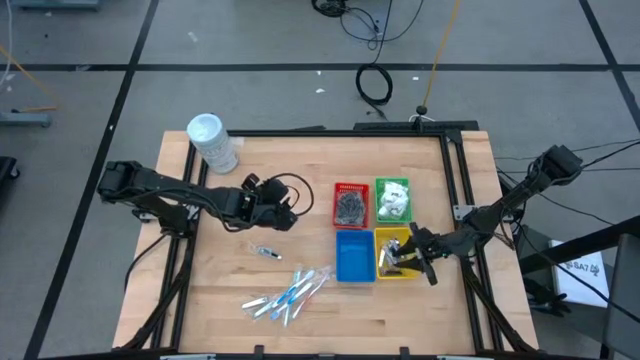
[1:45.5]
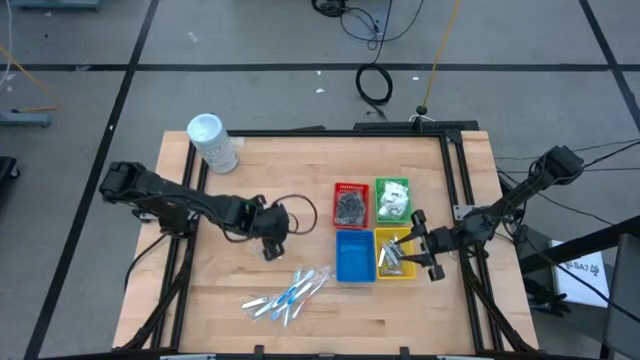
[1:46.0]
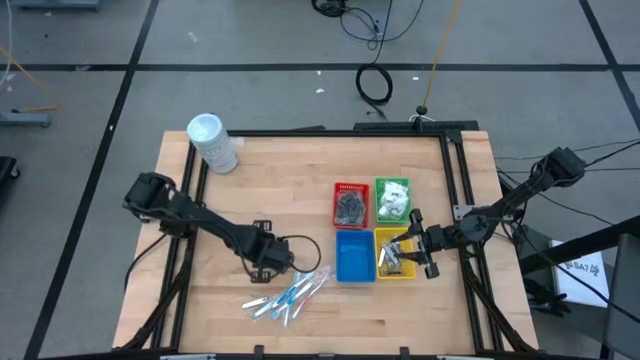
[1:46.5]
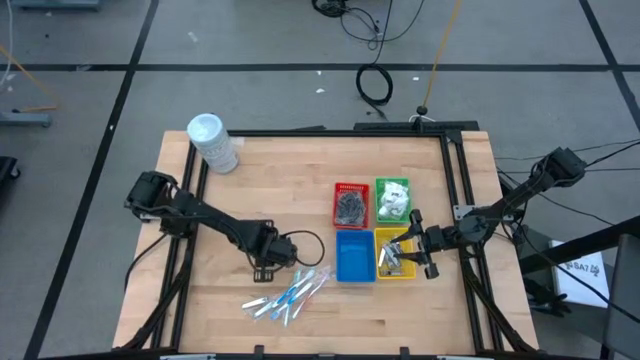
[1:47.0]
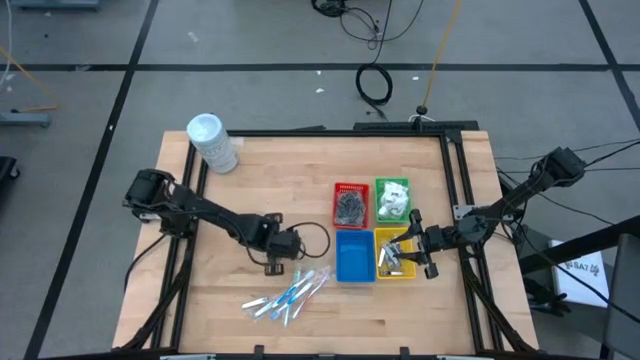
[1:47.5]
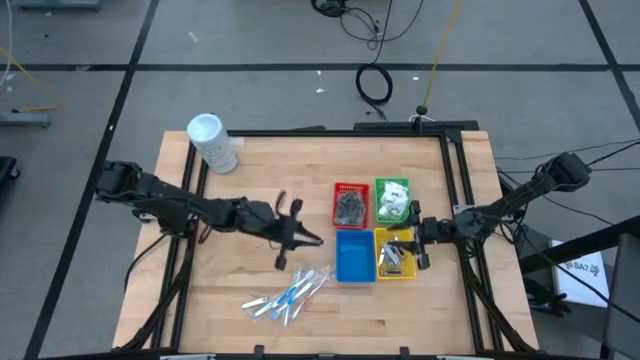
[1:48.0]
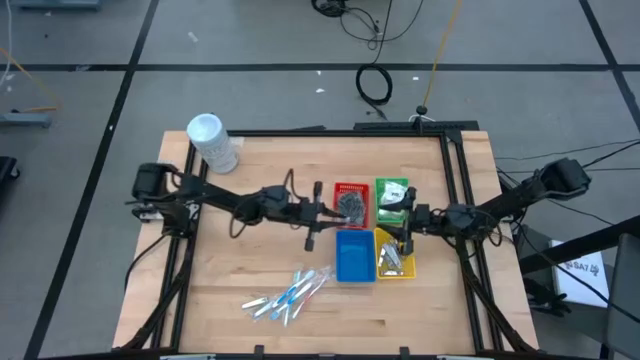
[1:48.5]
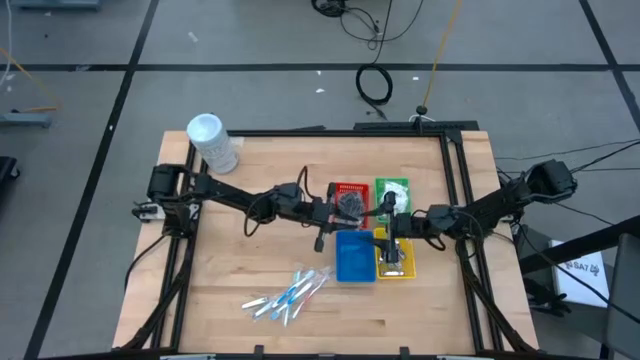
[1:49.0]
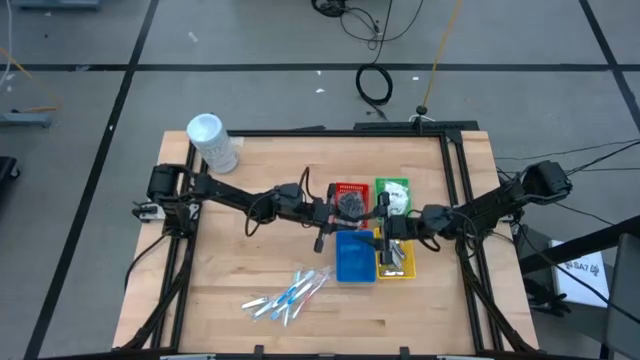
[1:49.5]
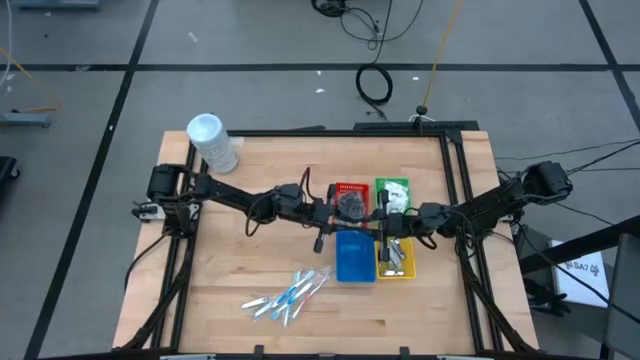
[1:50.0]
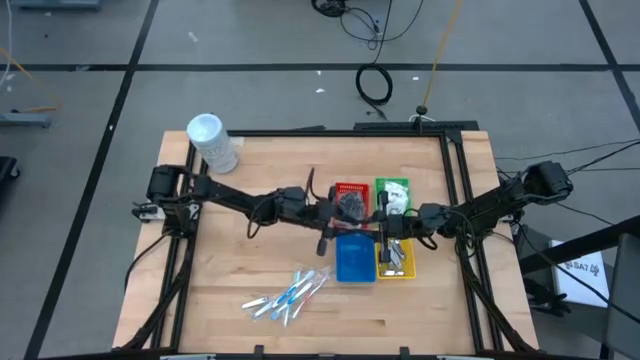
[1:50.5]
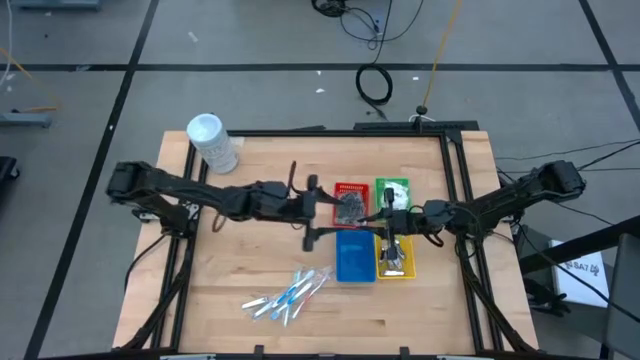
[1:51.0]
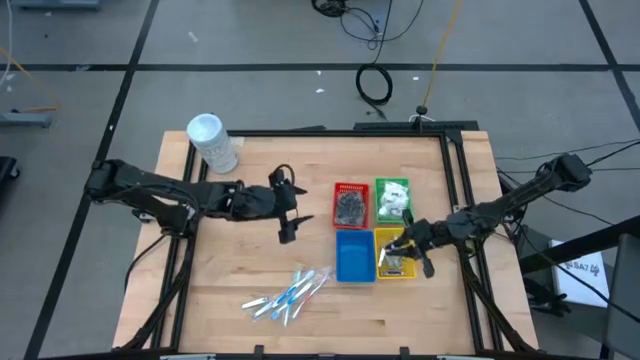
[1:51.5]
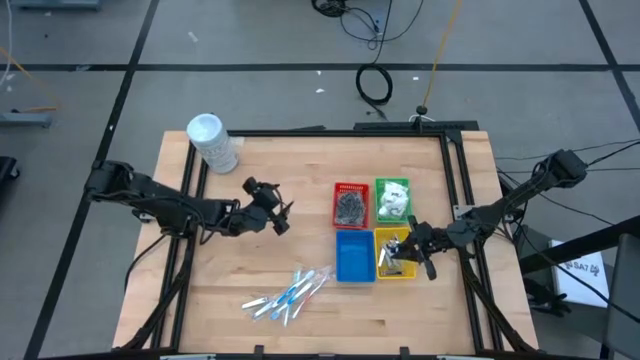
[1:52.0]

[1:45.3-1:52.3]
Task: Pick & Place Travel size toiletries
Put the silver nail cutter into the yellow bin

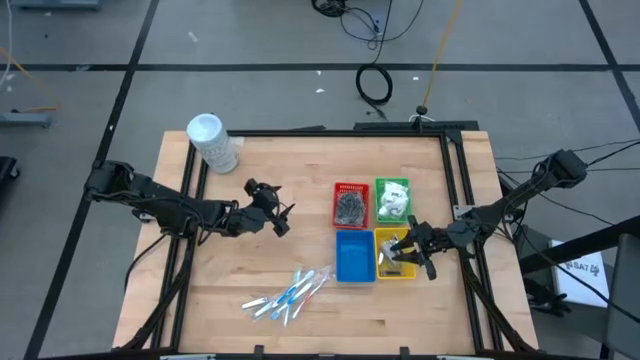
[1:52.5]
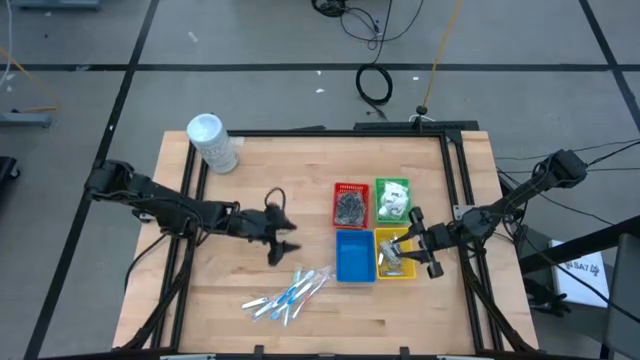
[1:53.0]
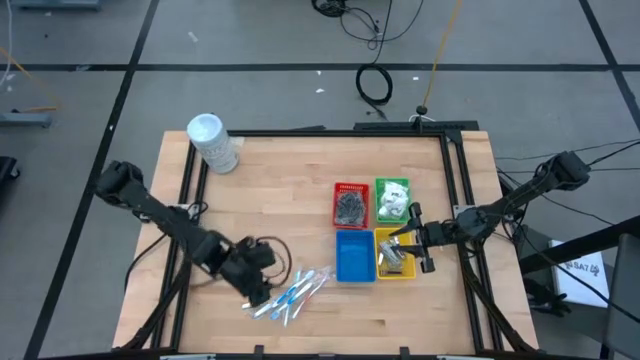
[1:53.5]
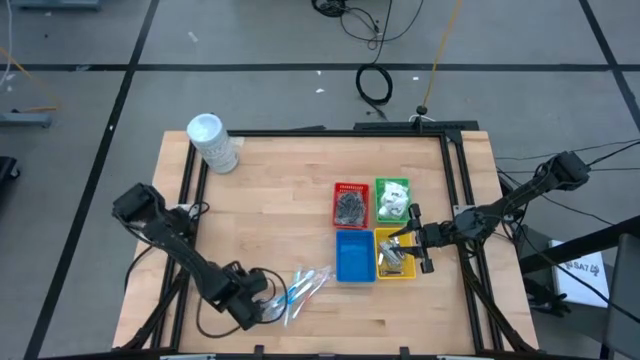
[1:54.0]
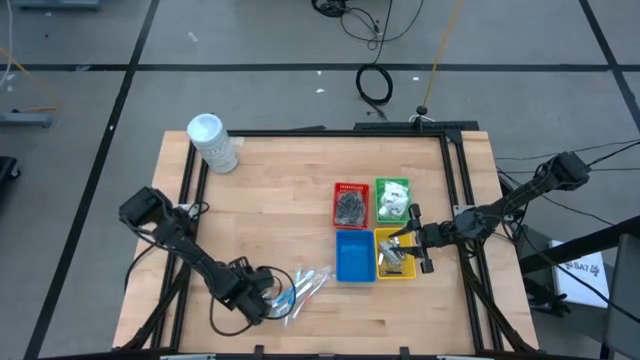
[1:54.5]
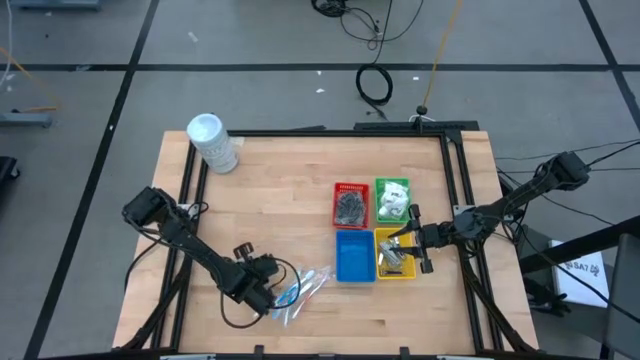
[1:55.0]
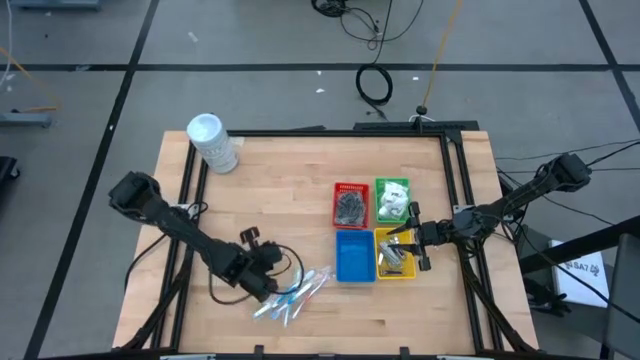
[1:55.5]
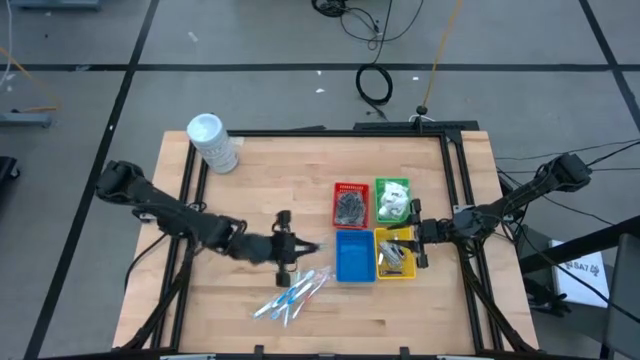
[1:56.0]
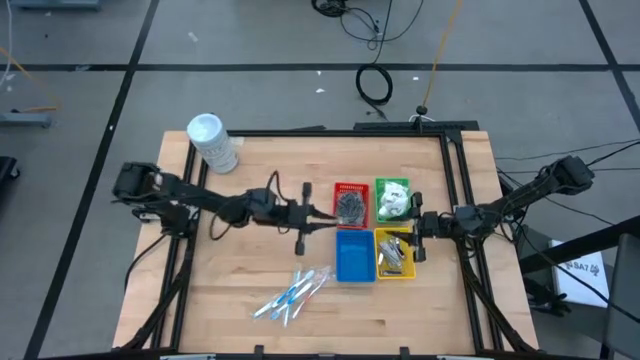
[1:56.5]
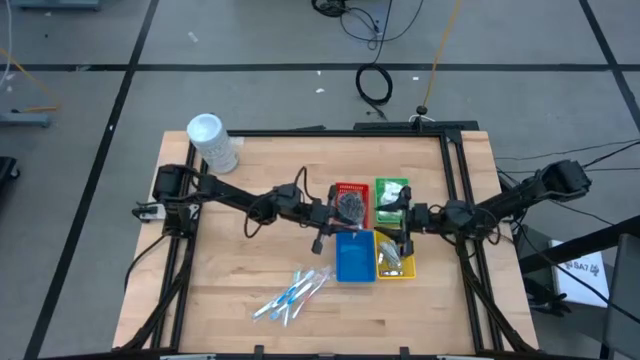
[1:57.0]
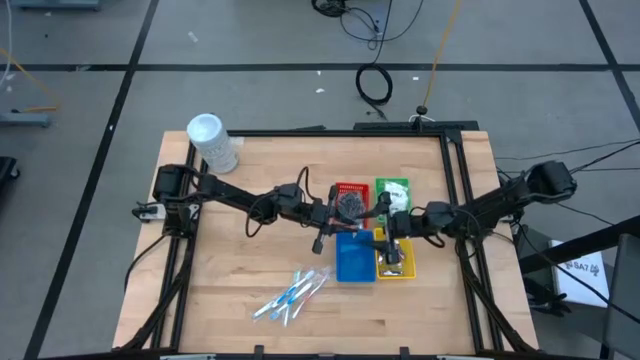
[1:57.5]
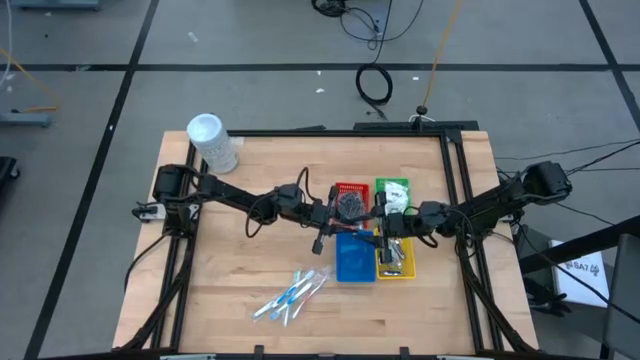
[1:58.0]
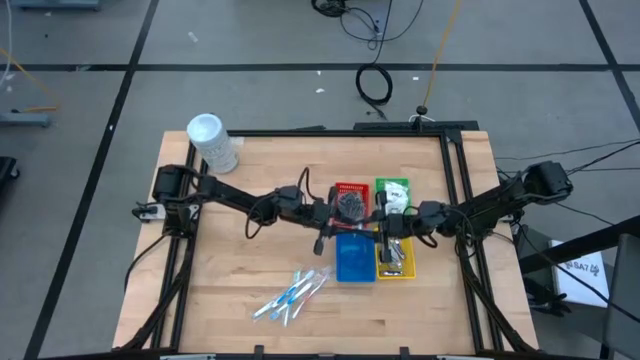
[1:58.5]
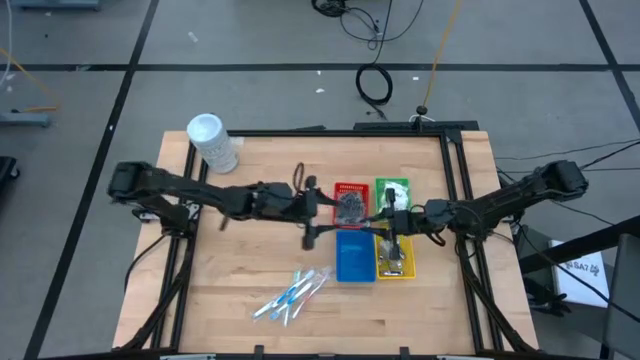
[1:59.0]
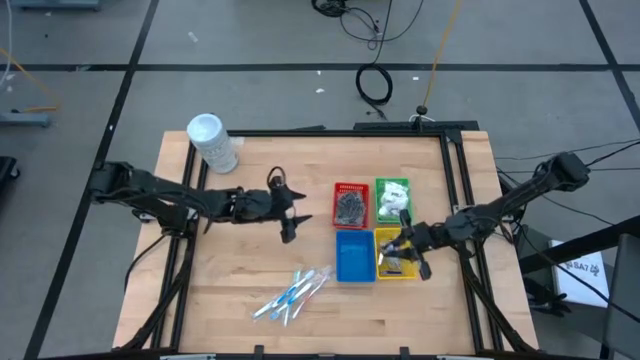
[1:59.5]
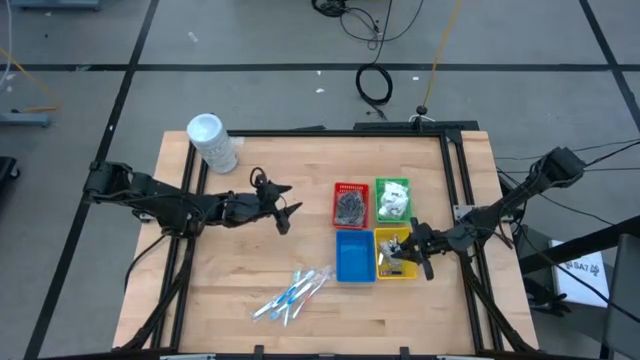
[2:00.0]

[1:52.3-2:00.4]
Put the silver nail cutter into the yellow bin

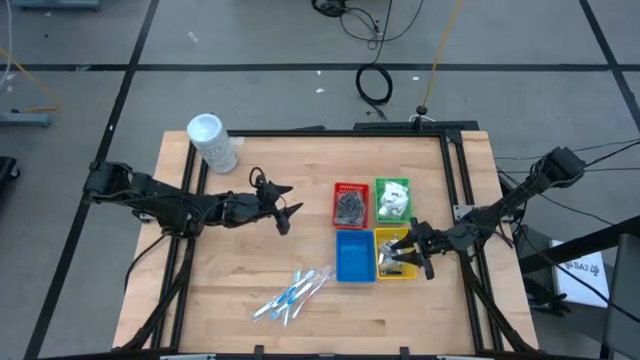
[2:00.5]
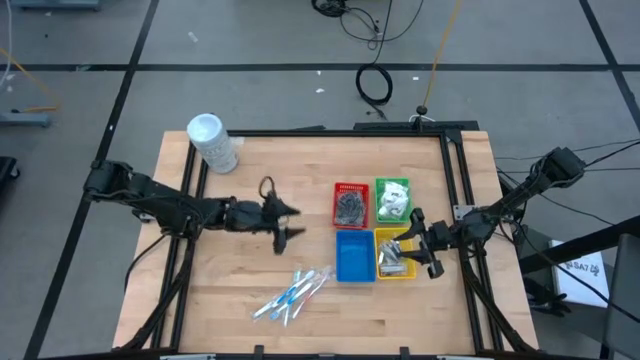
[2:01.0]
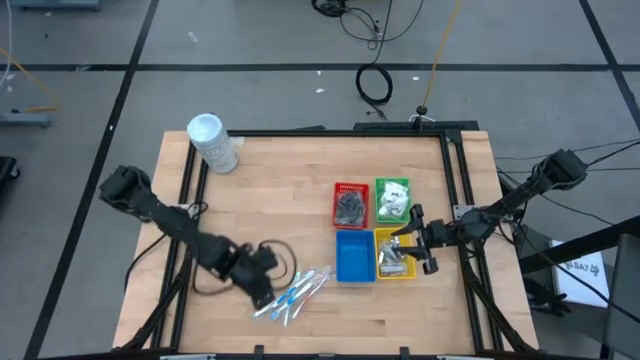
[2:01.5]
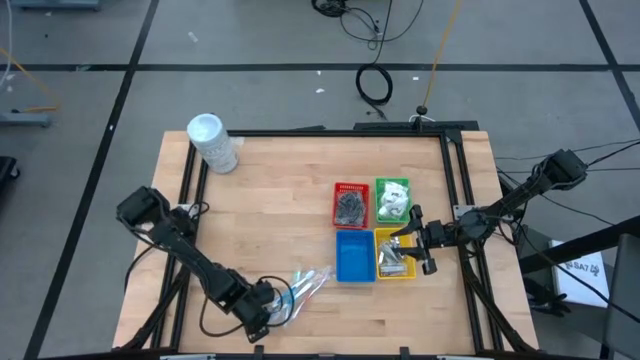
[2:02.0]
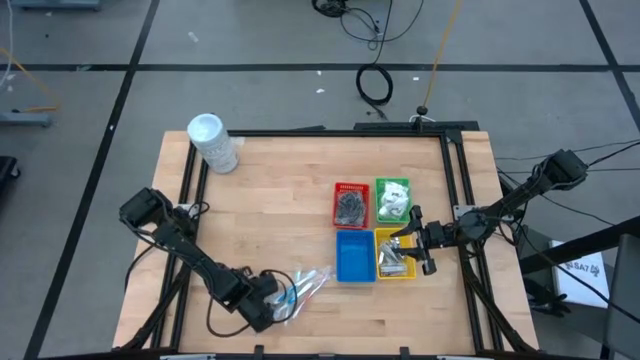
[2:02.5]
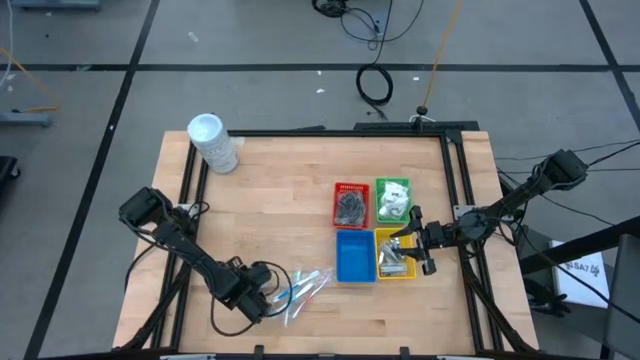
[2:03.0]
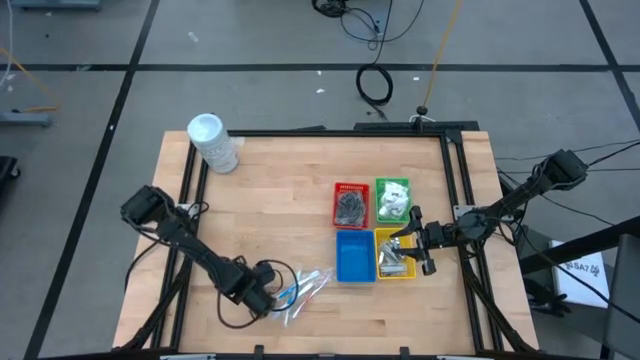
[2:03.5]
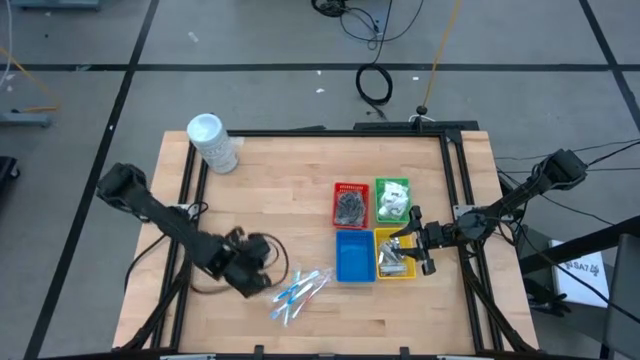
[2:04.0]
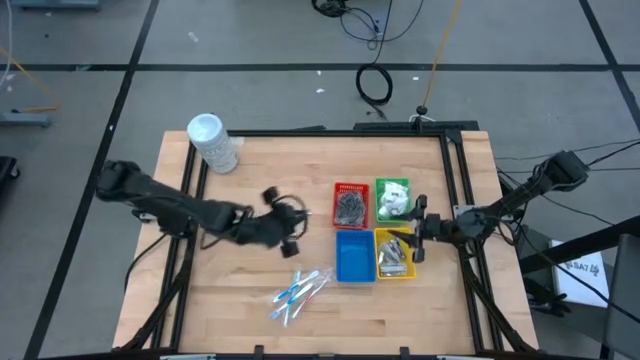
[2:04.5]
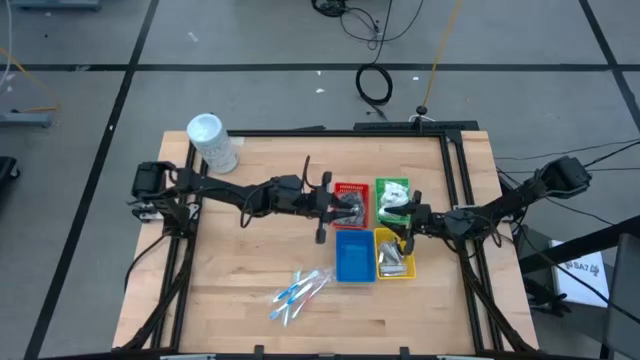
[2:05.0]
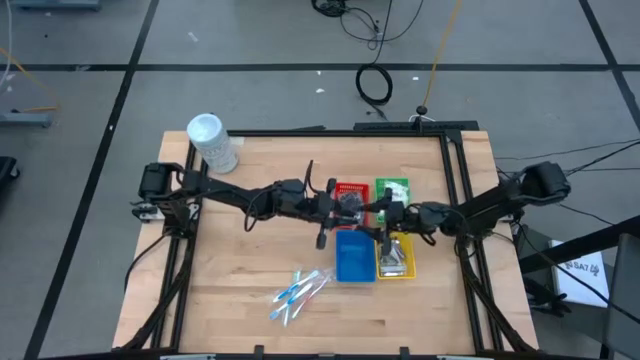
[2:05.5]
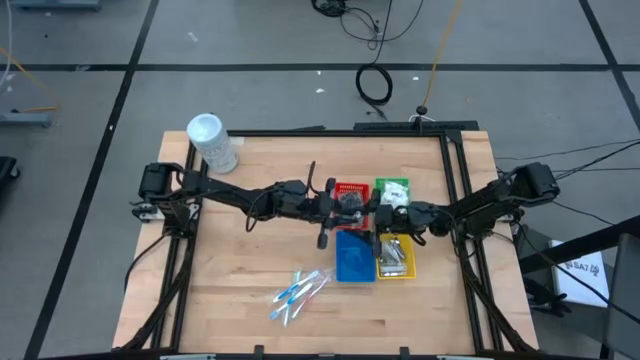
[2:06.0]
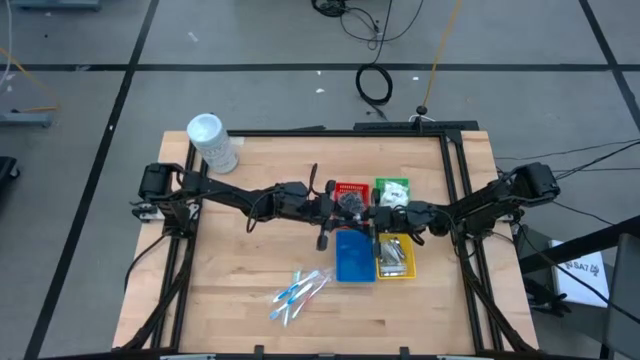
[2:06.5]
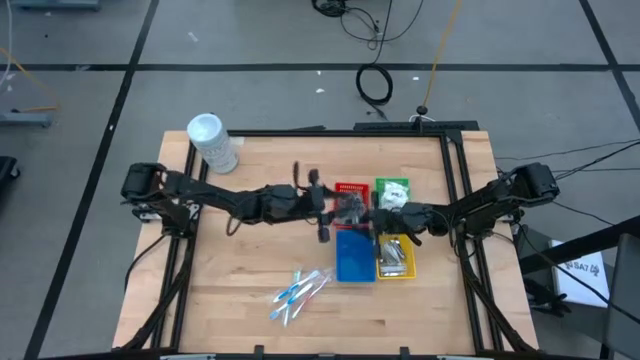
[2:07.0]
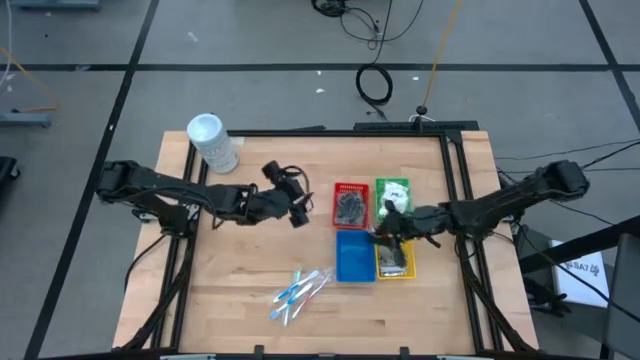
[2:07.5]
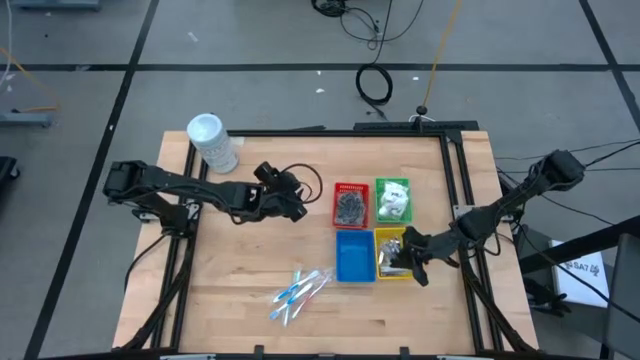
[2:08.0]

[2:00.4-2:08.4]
Put the silver nail cutter into the yellow bin
